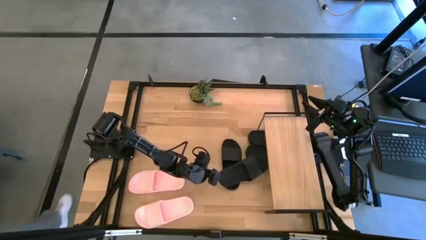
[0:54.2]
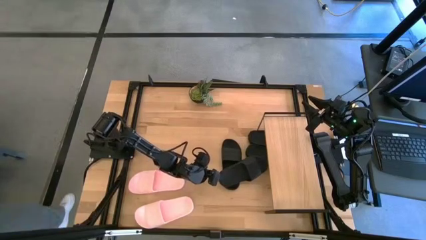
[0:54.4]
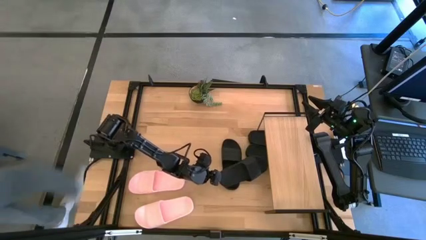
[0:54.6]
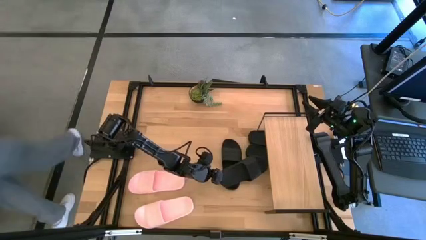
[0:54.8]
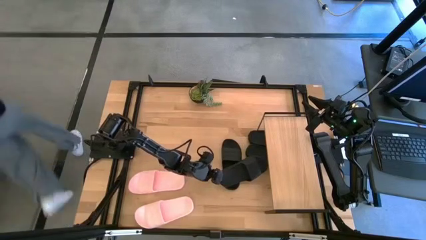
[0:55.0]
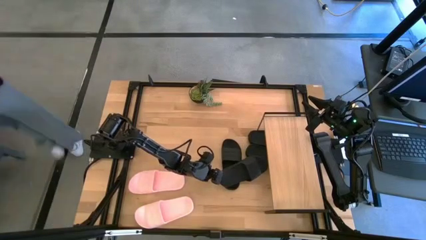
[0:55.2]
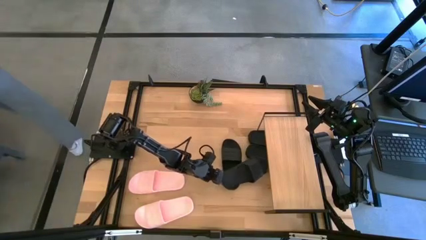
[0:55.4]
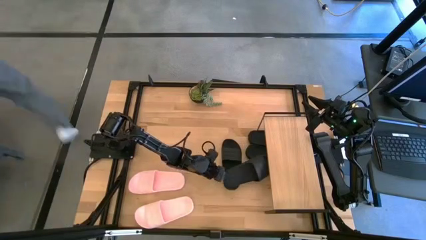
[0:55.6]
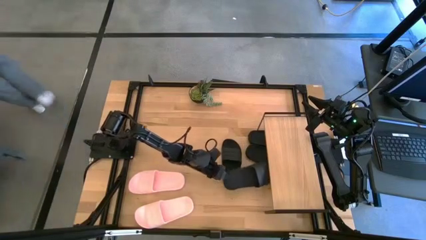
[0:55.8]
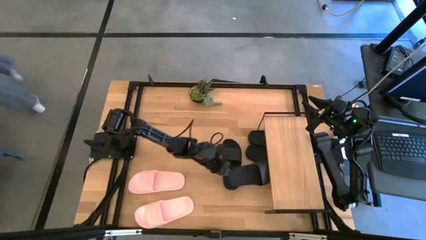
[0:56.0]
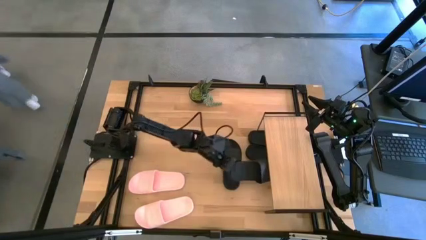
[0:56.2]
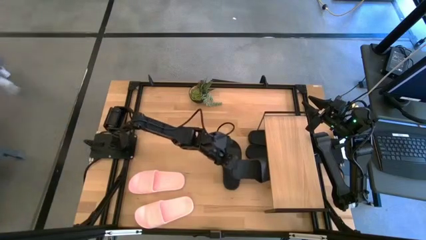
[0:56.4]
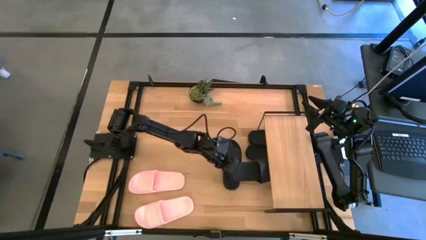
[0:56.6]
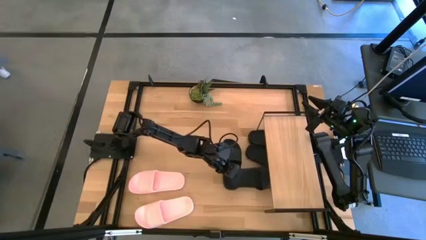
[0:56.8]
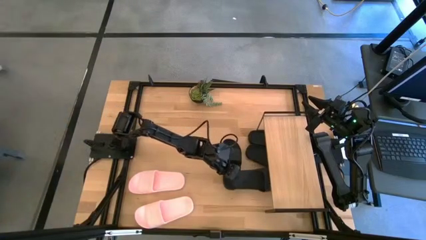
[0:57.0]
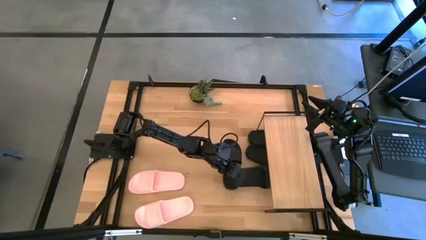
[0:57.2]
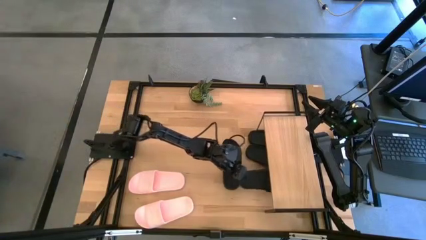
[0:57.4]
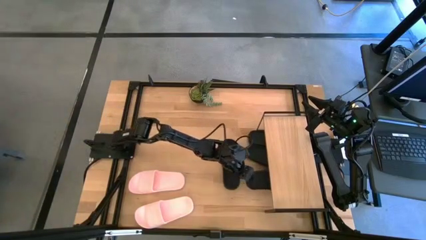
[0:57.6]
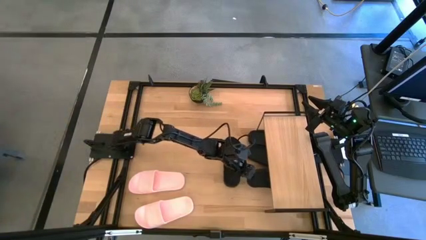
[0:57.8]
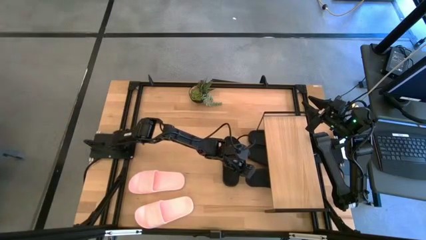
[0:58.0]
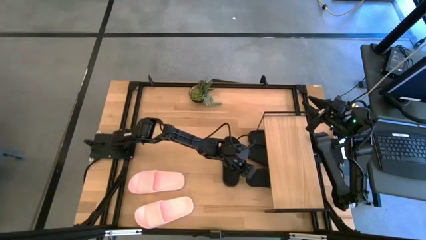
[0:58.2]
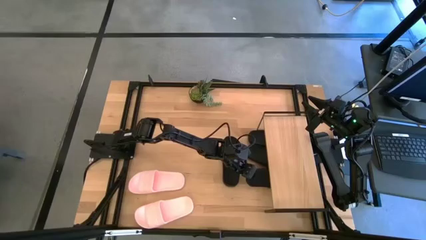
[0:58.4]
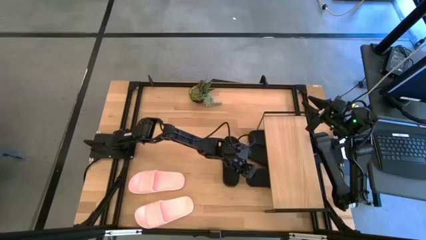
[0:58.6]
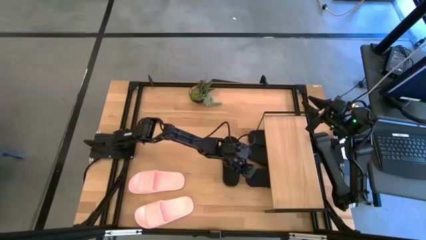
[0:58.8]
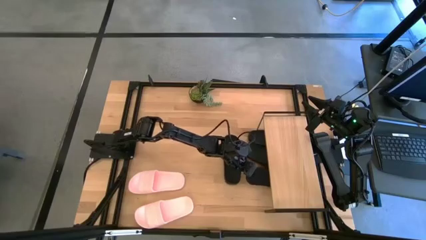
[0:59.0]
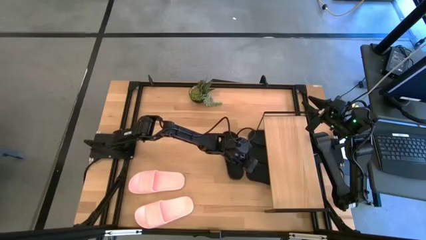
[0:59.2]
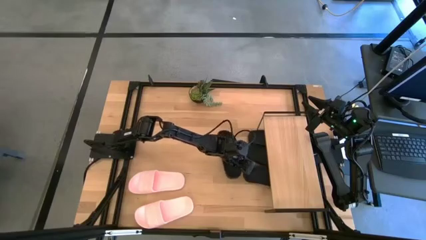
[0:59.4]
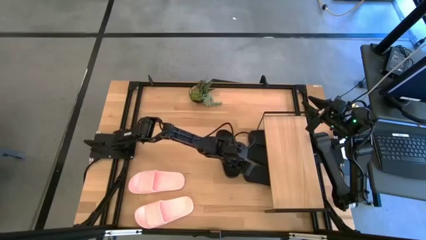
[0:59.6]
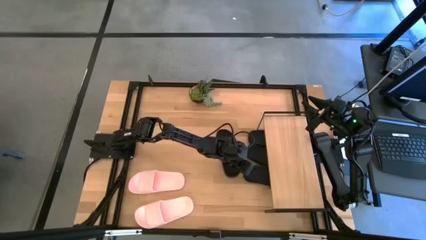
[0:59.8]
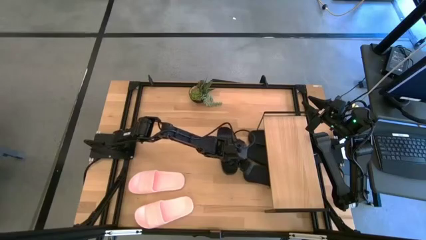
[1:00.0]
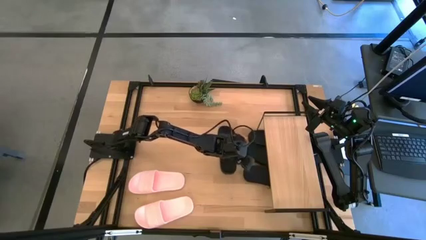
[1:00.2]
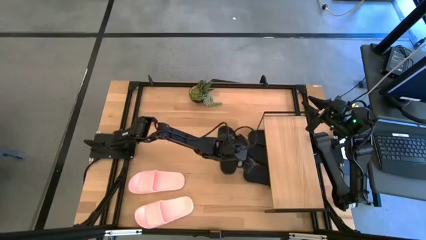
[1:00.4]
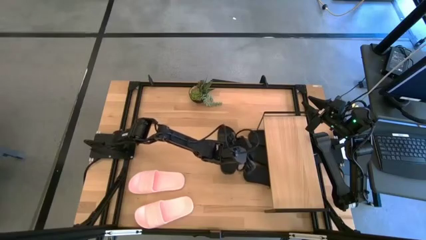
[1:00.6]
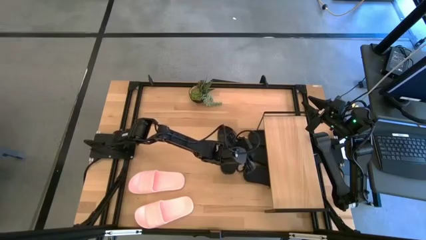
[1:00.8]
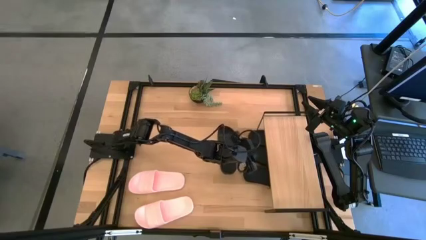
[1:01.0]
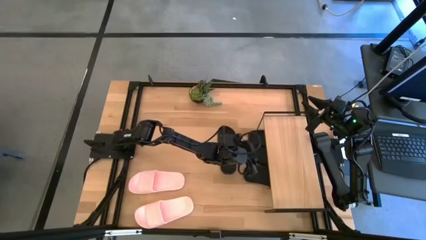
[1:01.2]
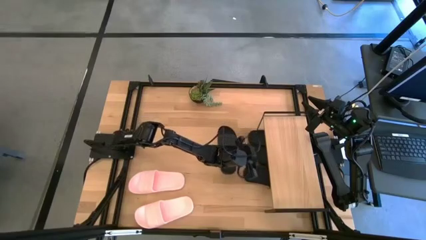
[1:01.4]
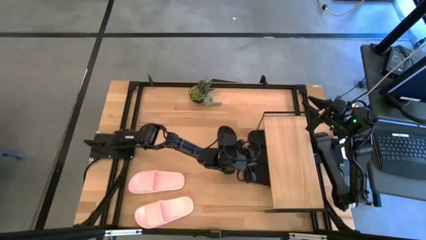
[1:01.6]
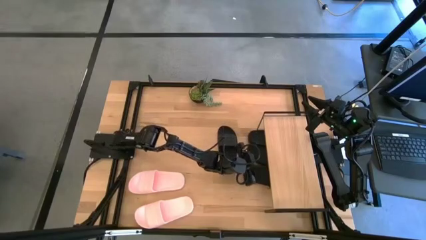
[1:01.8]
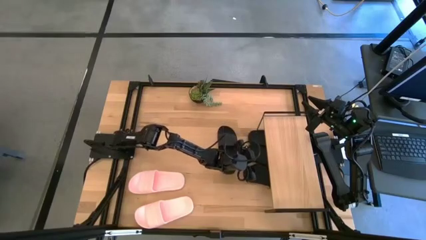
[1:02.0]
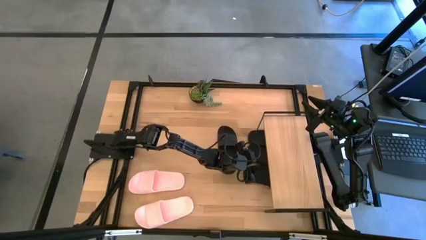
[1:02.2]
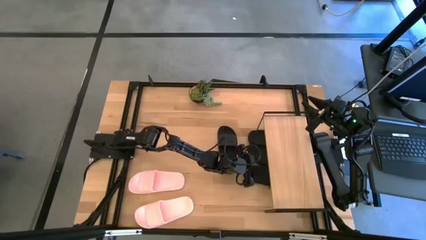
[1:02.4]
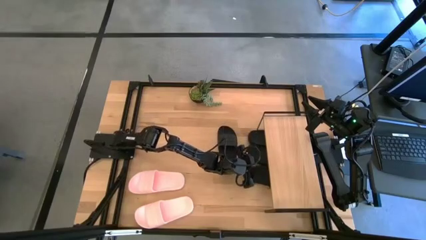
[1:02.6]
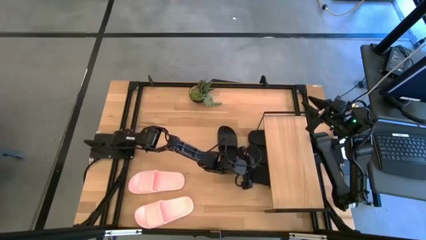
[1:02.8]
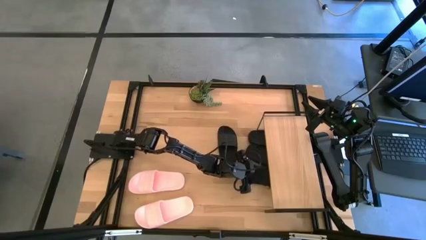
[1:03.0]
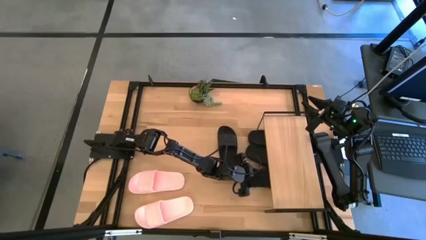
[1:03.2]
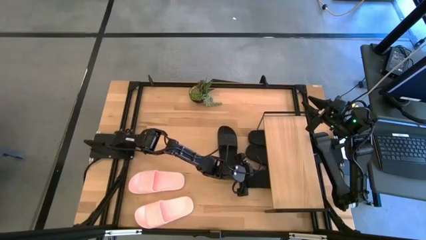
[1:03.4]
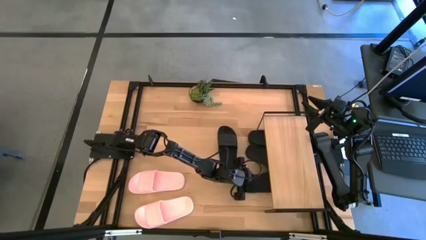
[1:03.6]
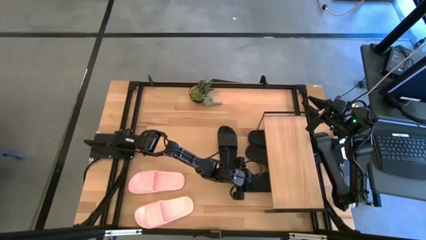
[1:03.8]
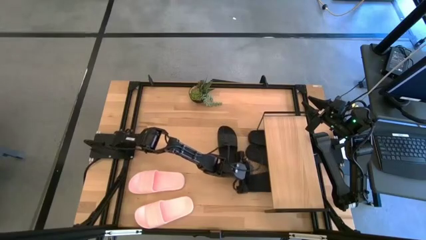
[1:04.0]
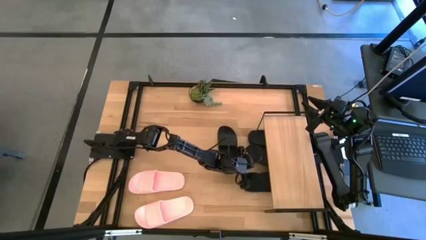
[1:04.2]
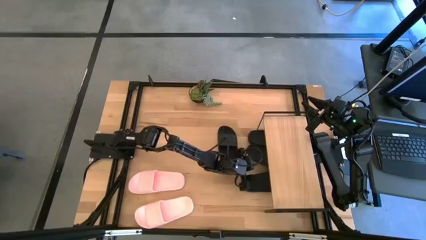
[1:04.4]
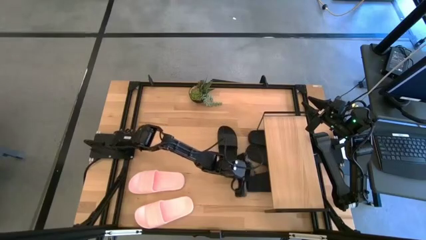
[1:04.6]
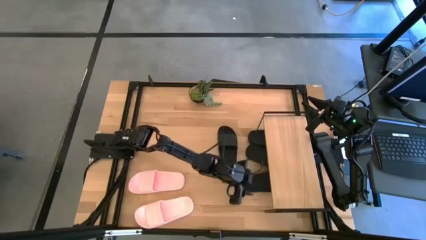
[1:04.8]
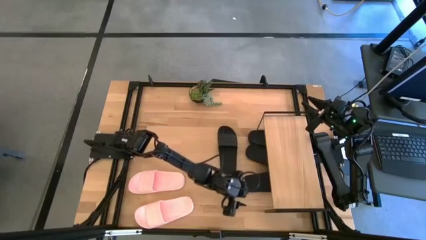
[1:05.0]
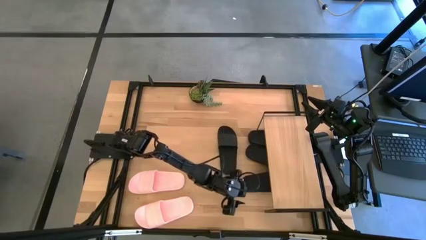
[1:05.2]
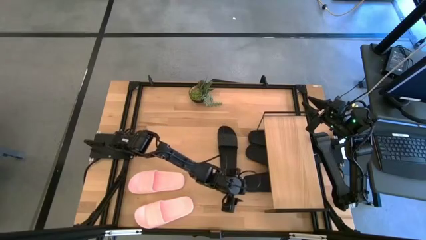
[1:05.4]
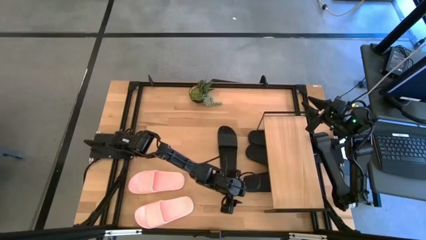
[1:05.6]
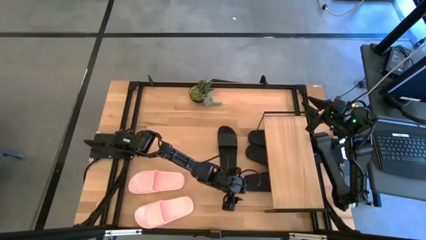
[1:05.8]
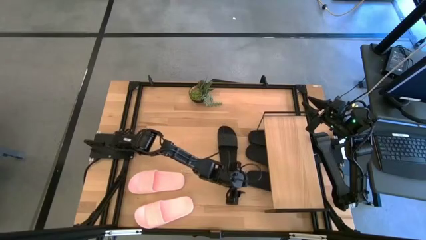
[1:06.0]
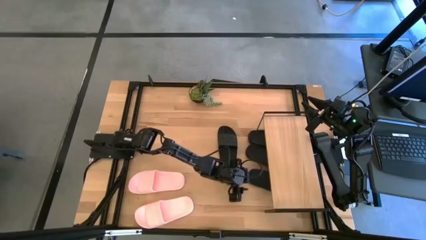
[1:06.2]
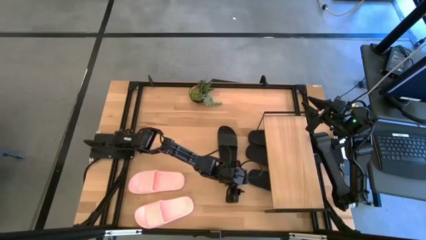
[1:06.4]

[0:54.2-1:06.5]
Task: Pick and place slides into the shelf
Put the black slides under the shelf
